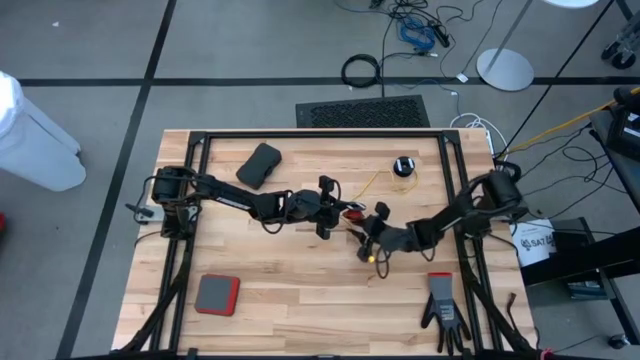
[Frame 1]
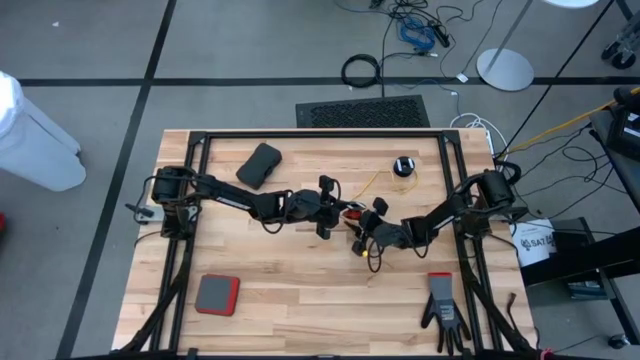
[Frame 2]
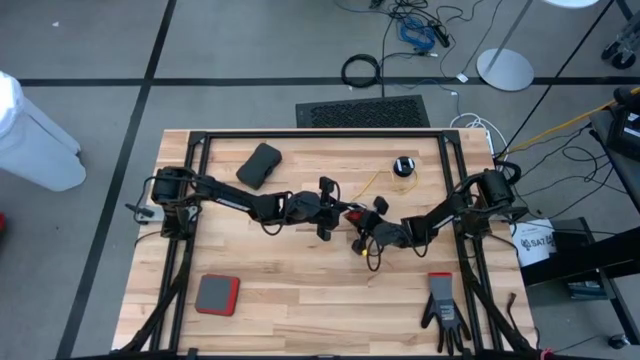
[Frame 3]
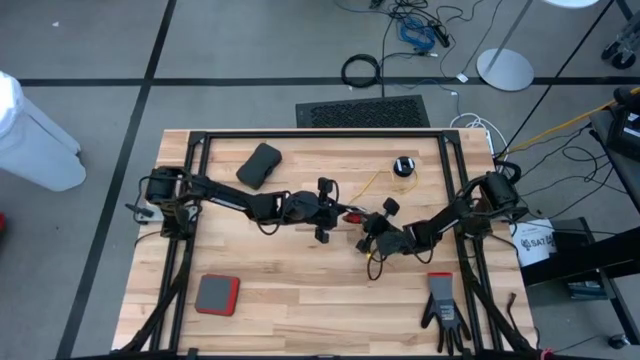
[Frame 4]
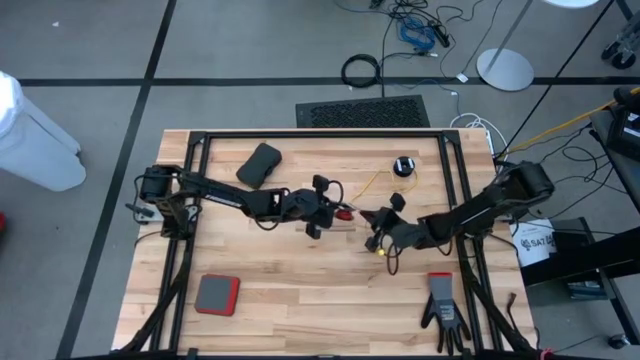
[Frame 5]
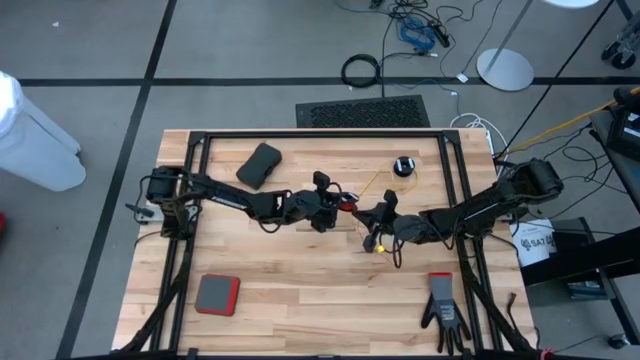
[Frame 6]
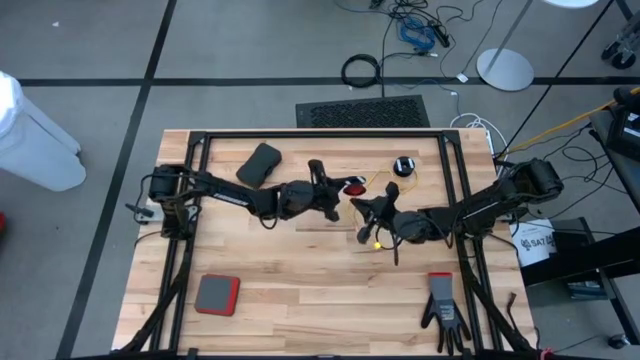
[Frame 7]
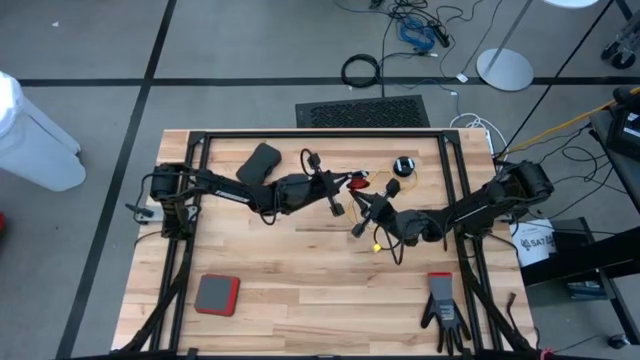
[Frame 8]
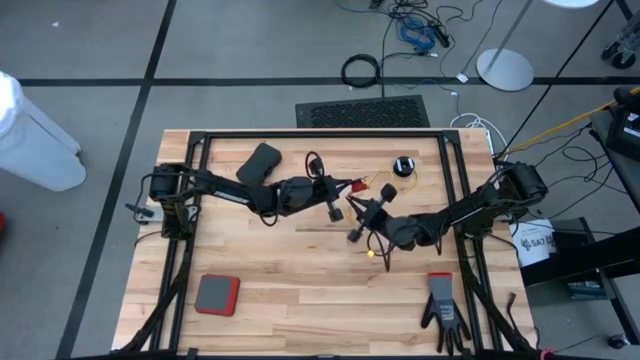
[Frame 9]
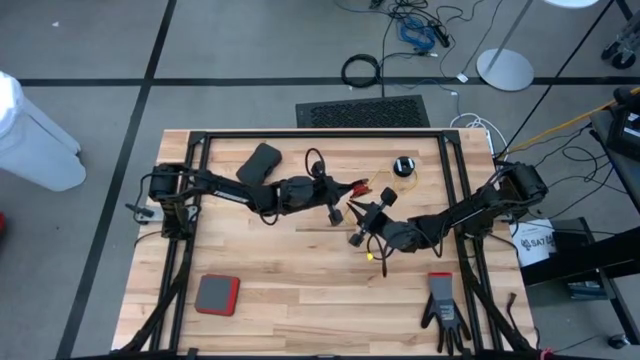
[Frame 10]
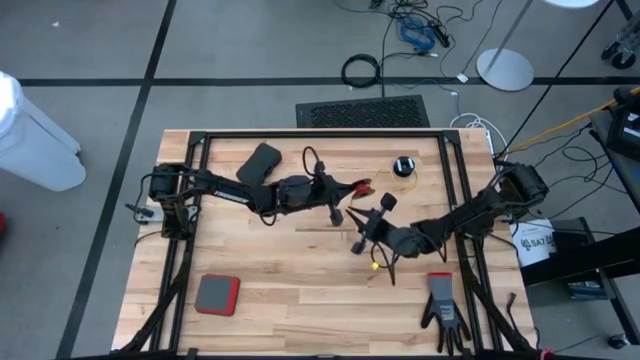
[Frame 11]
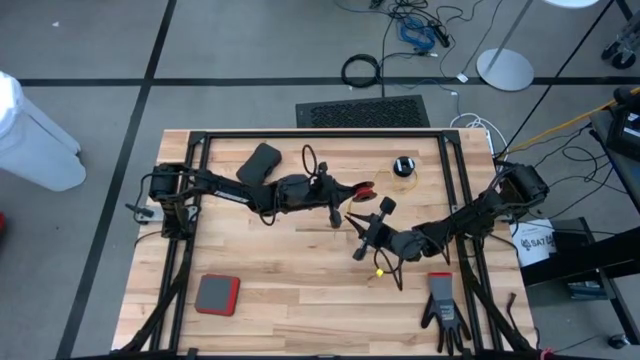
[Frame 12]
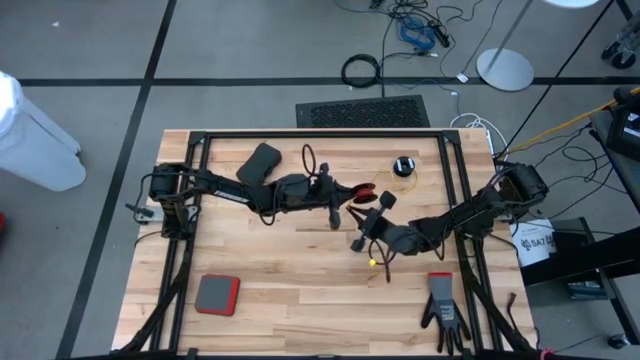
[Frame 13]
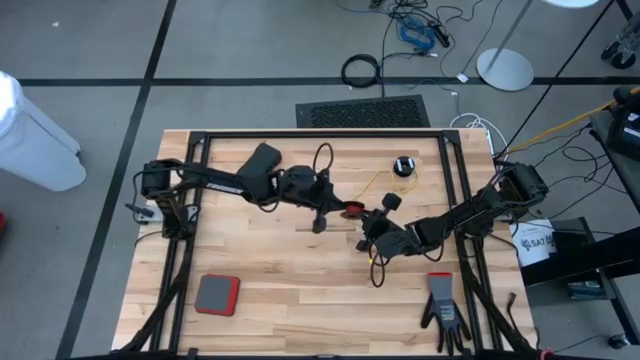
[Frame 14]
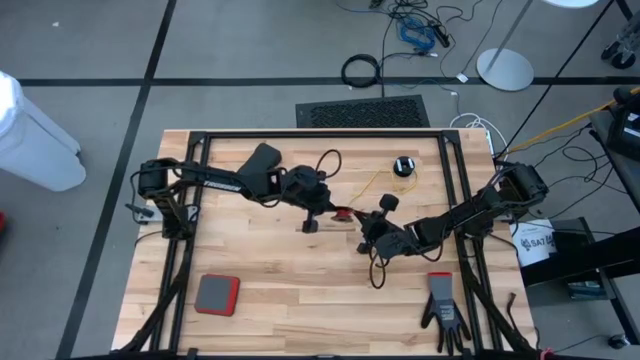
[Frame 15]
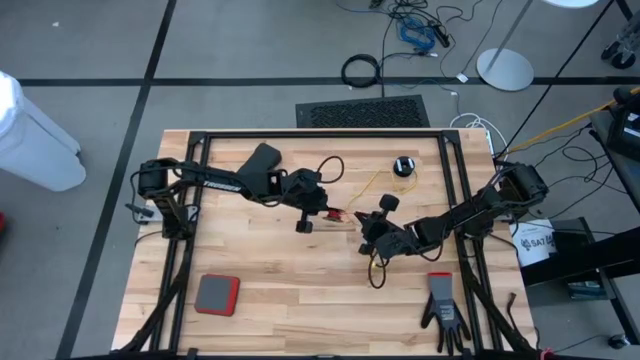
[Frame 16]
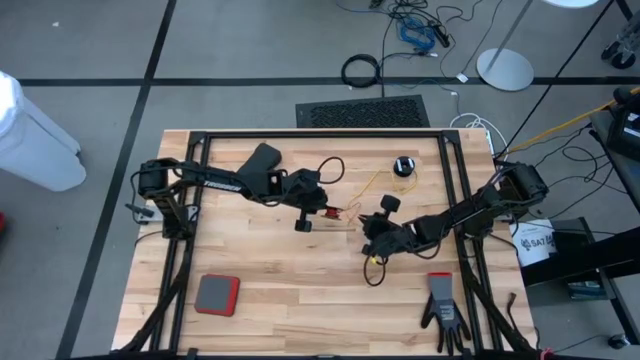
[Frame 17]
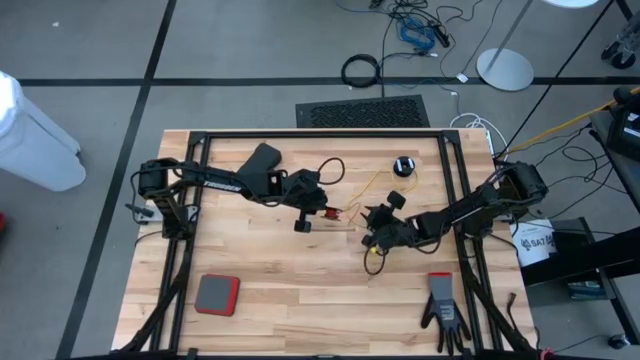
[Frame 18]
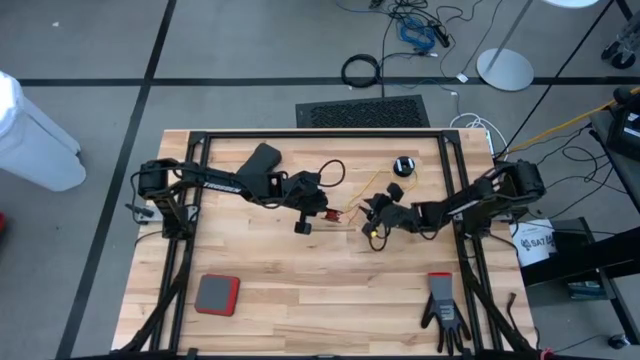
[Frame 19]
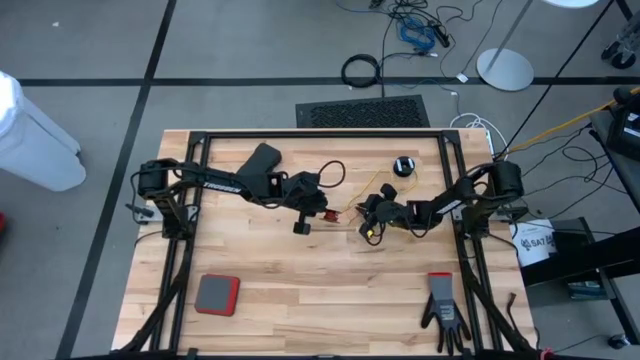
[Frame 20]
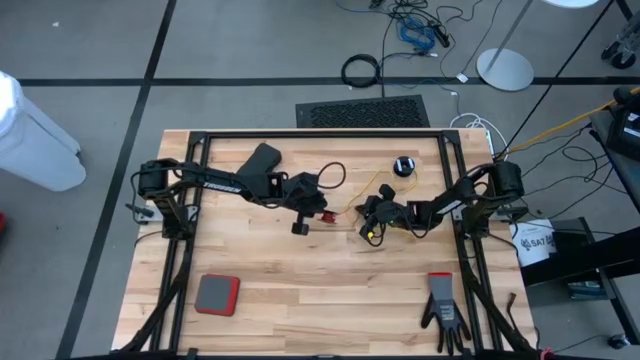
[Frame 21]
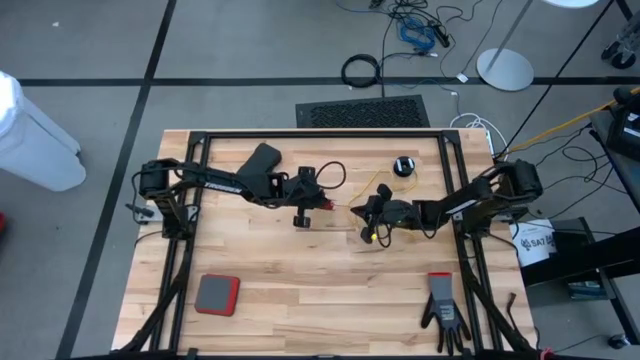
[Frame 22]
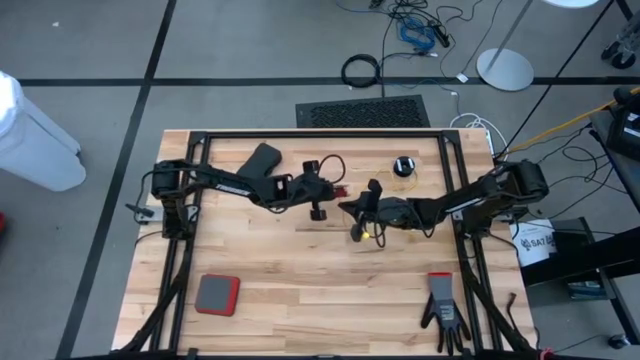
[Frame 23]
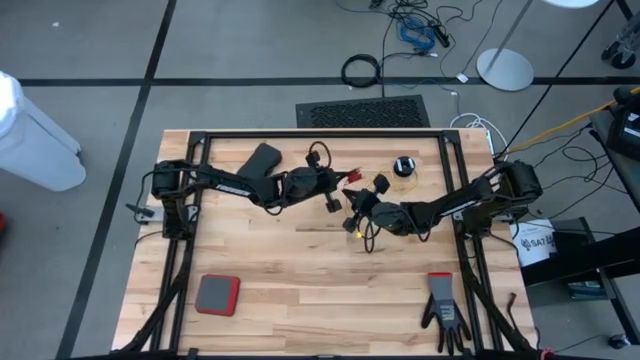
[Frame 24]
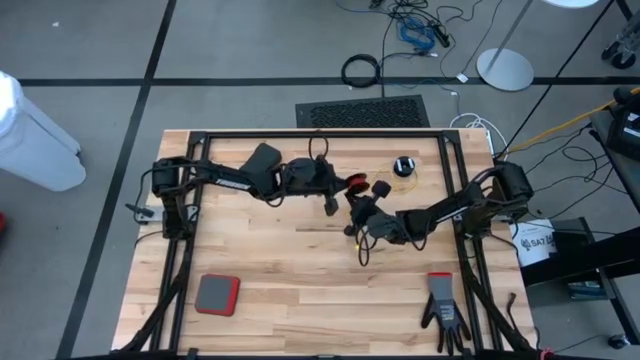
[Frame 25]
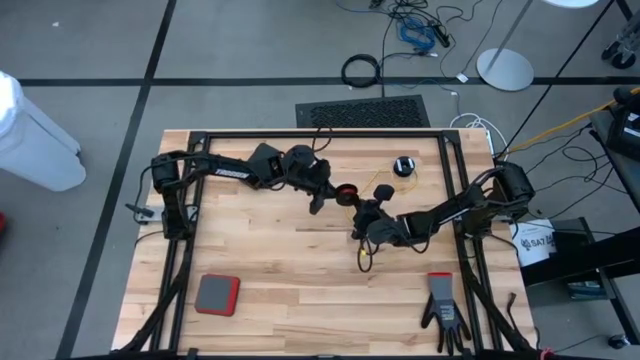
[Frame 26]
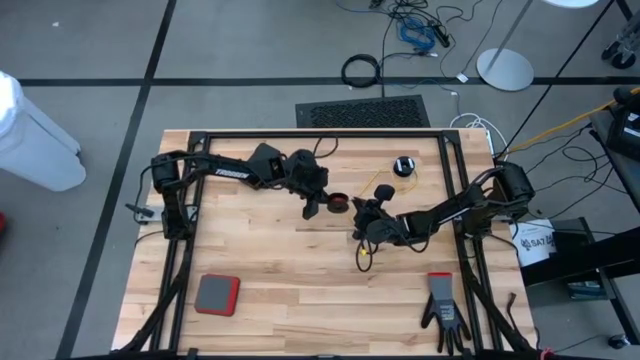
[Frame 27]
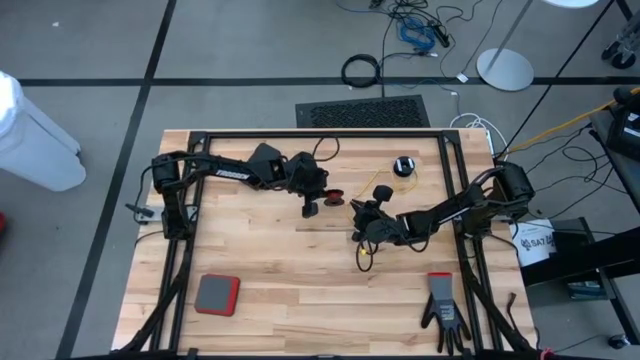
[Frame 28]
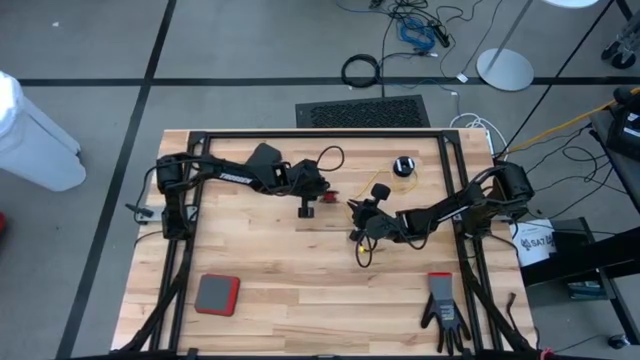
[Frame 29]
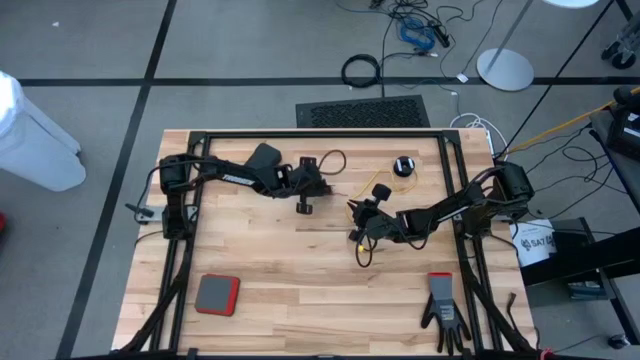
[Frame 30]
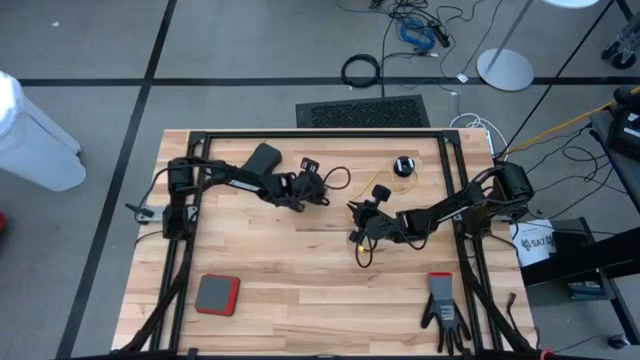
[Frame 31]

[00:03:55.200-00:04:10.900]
Task: Coil cords
Coil the red wire on the spool

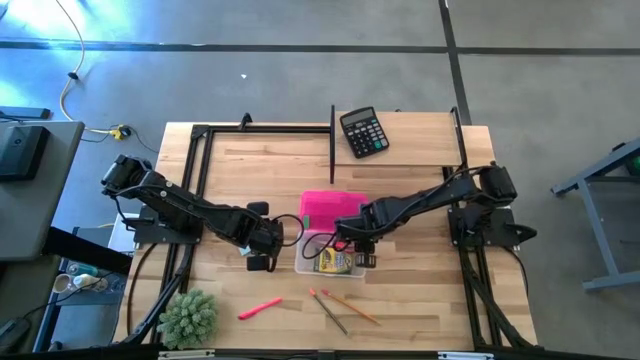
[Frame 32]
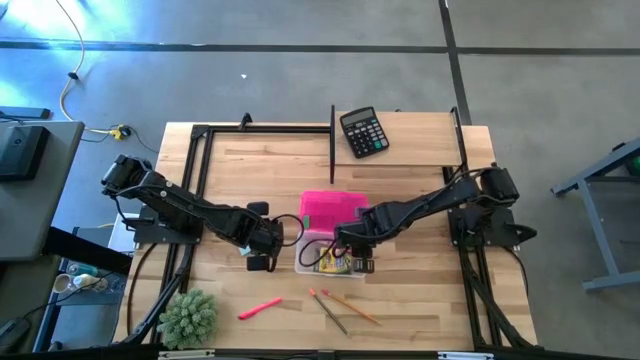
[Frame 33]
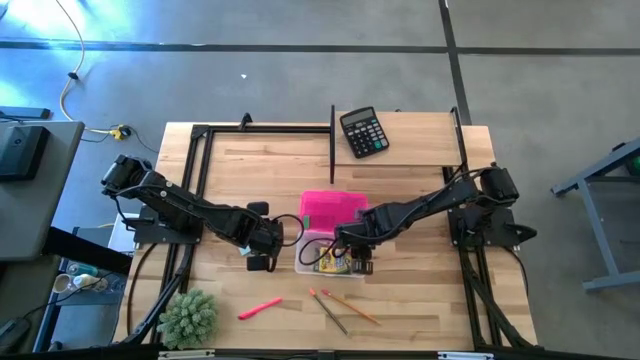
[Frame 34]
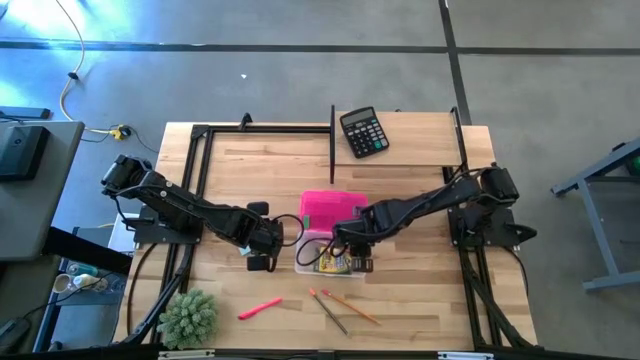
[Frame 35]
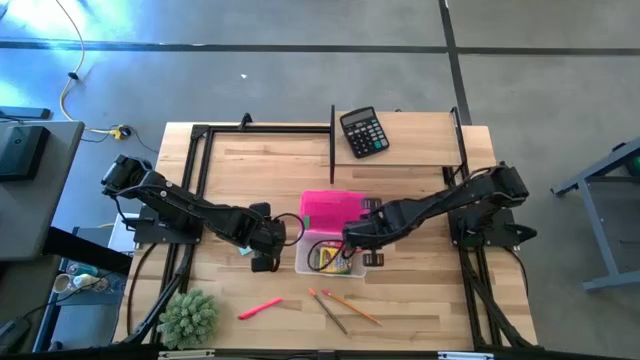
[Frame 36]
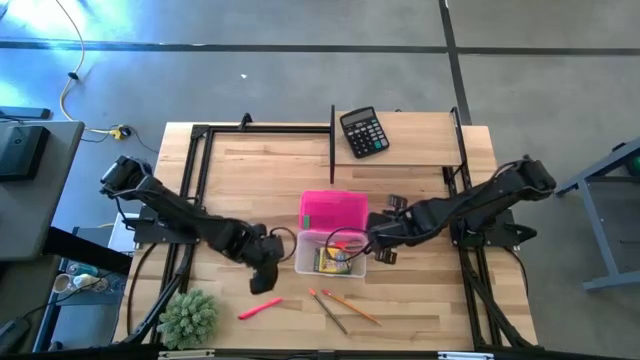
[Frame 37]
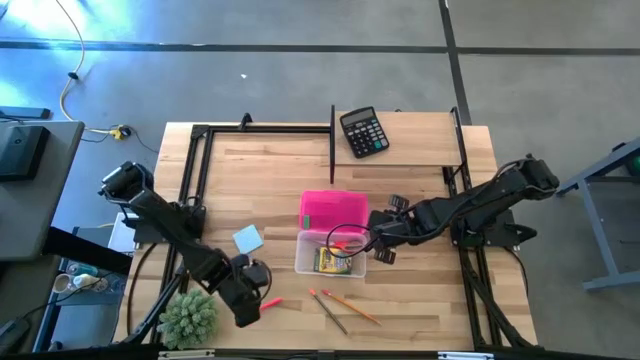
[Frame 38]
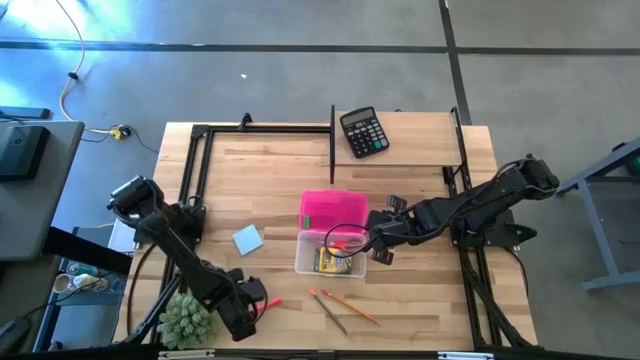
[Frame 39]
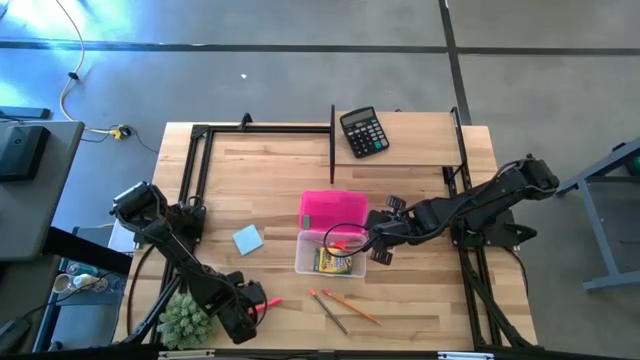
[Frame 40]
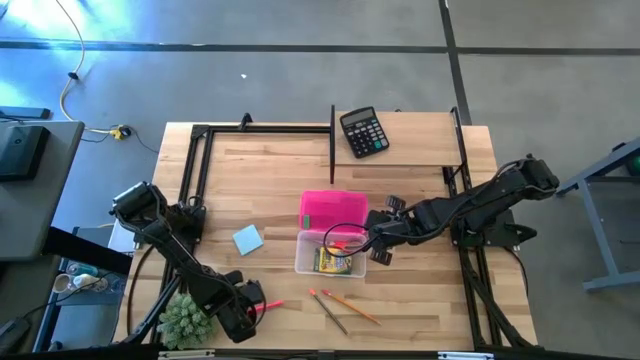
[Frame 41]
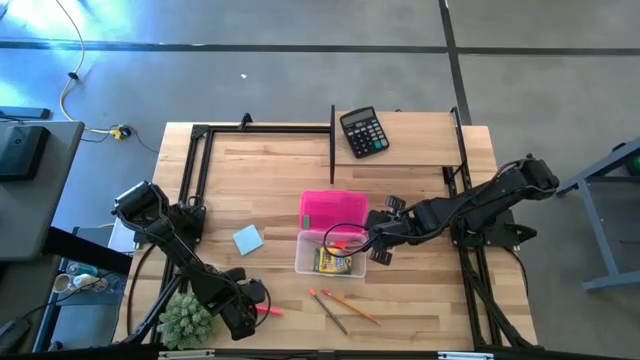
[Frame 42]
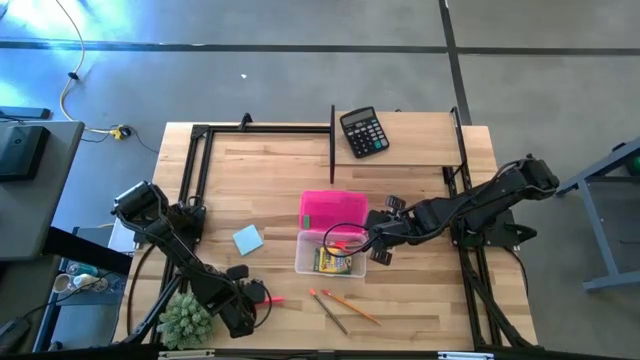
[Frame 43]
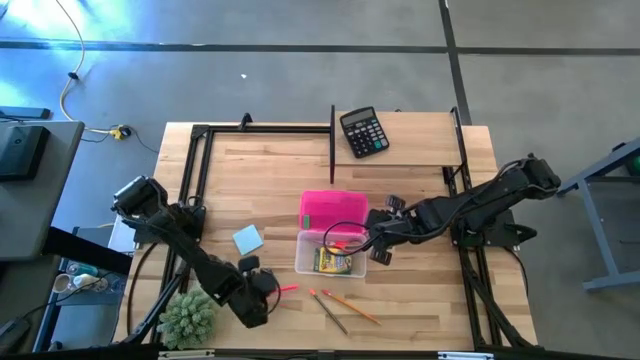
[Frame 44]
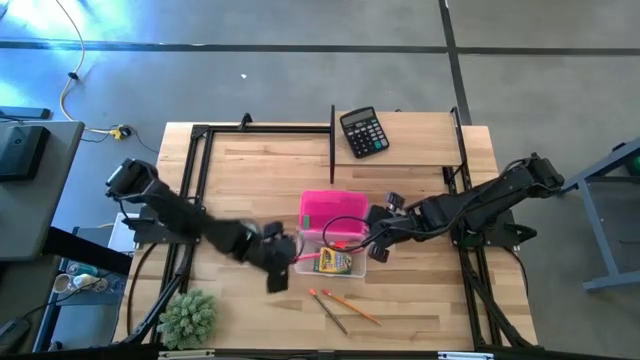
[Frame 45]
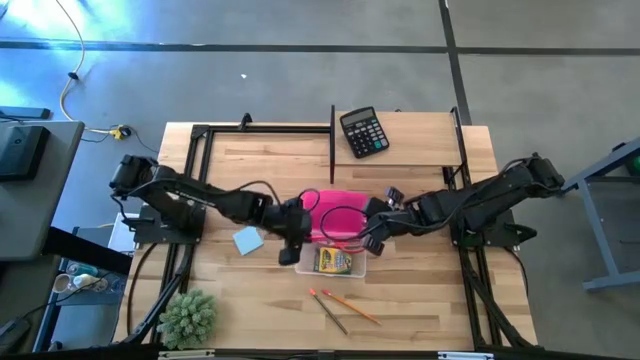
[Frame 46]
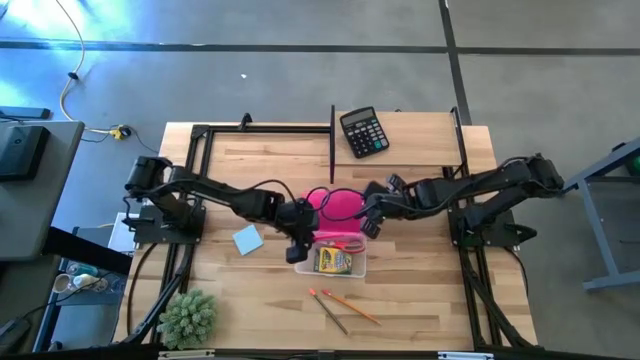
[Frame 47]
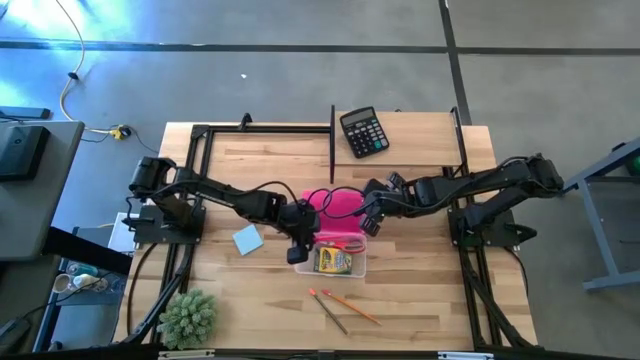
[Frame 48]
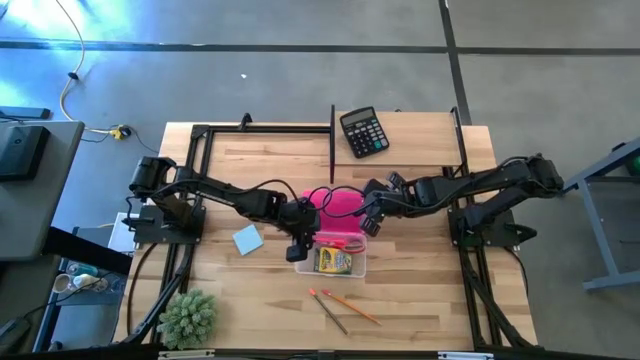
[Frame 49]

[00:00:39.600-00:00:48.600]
Task: Pack school essentials
Put the pink pen into the pink supply box
